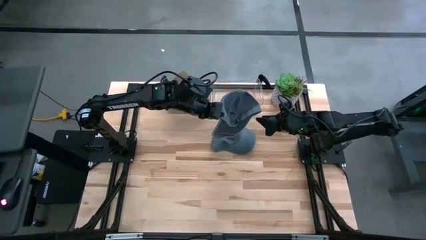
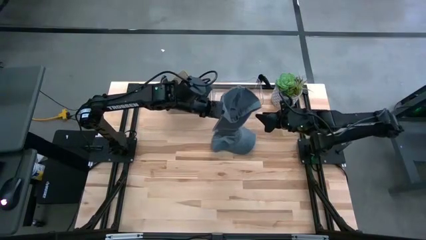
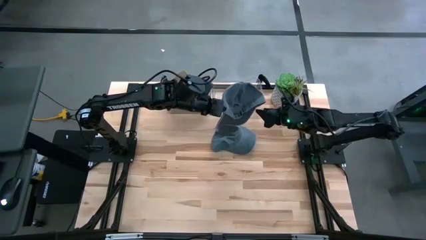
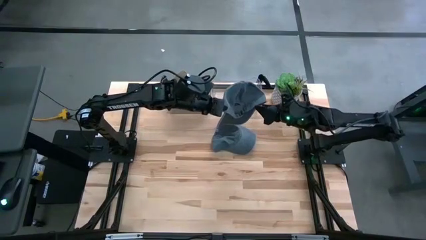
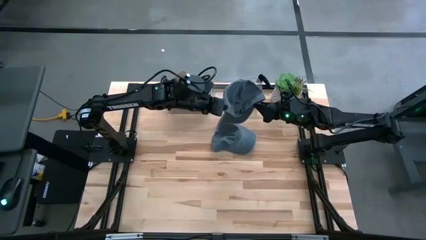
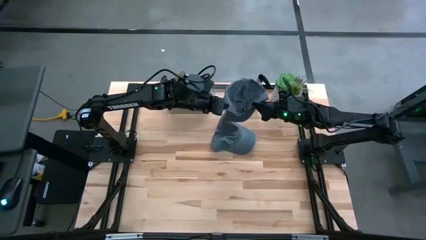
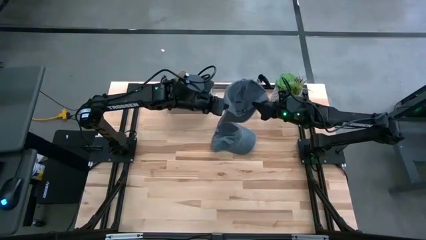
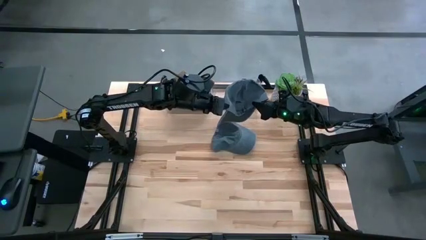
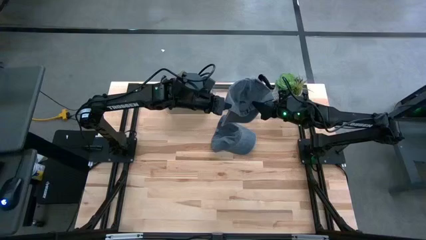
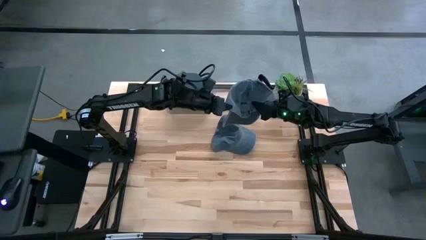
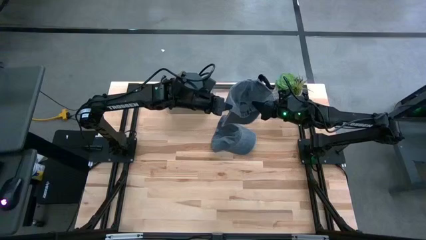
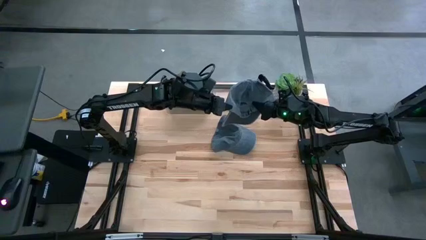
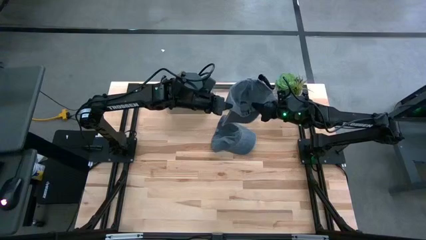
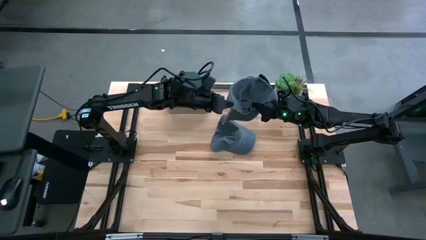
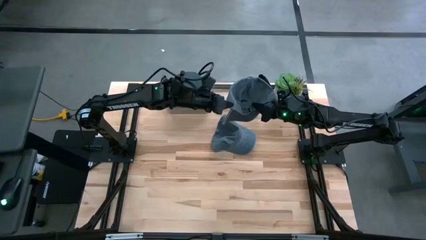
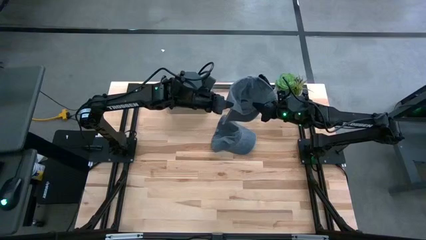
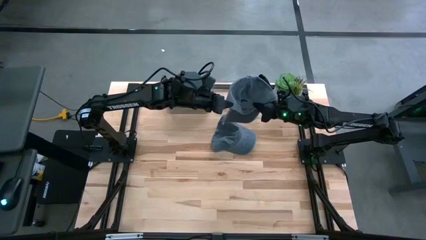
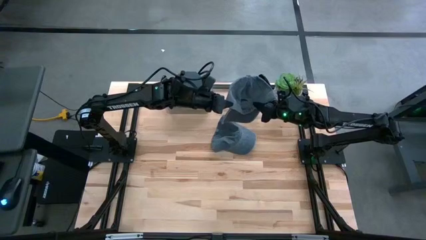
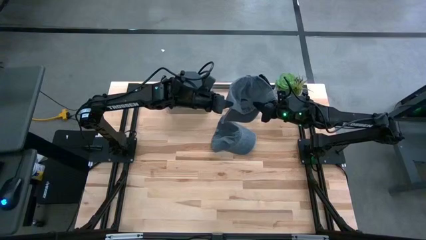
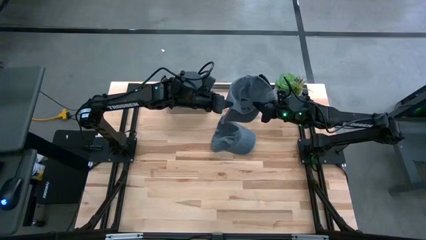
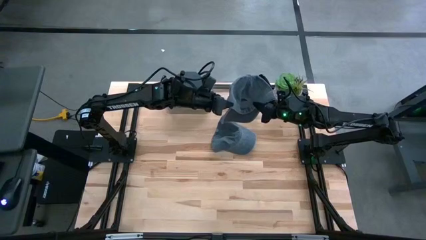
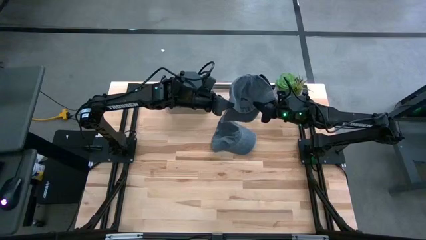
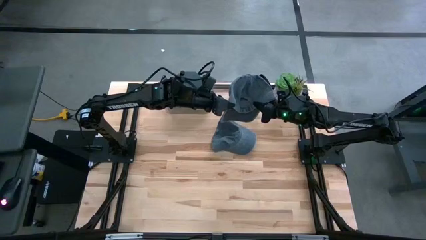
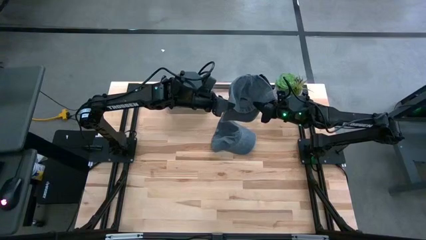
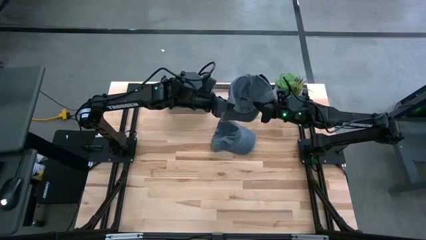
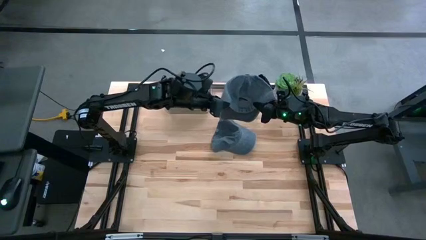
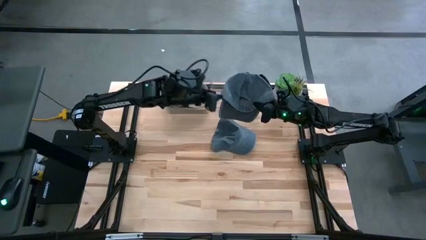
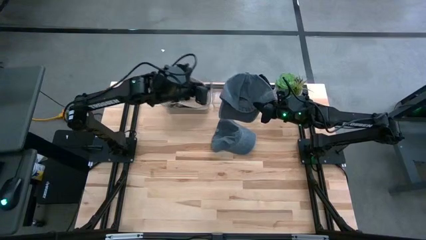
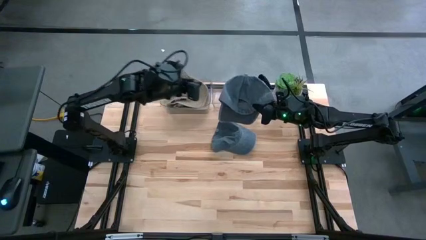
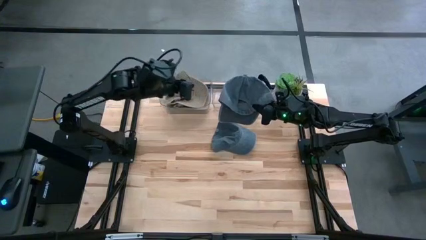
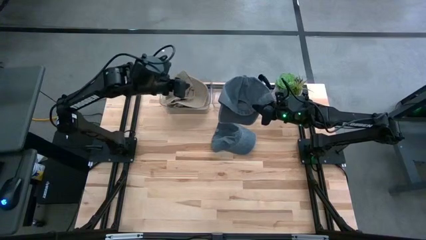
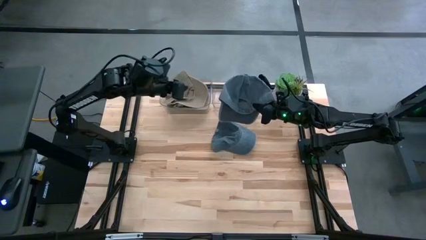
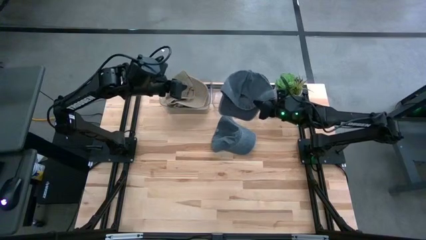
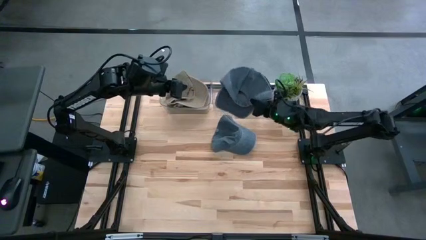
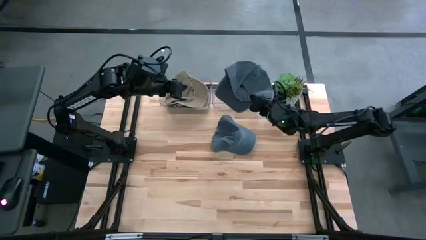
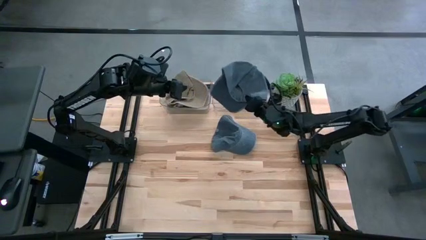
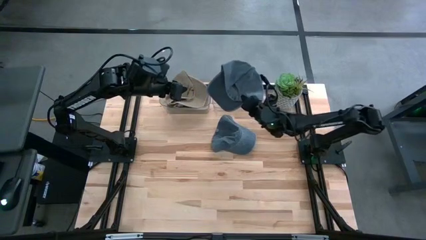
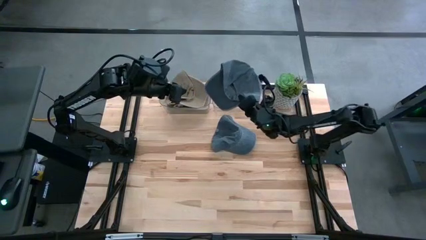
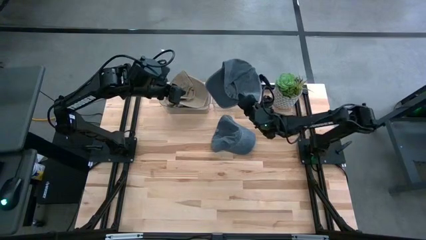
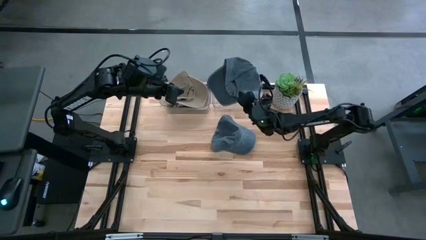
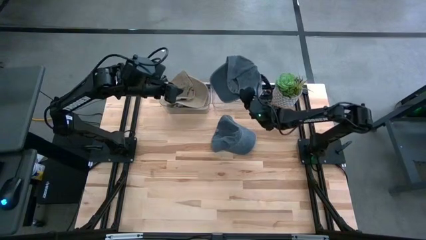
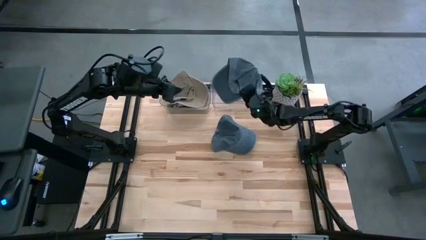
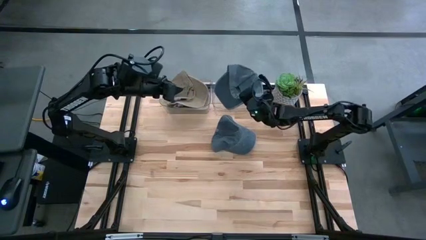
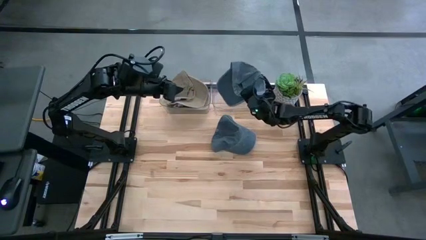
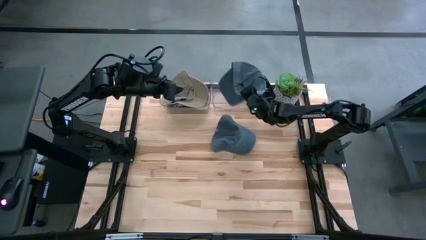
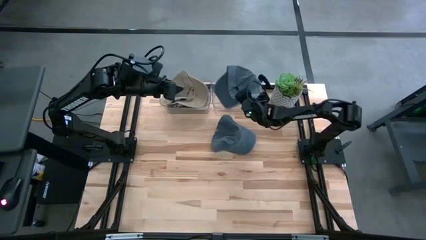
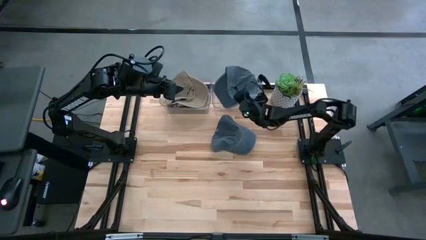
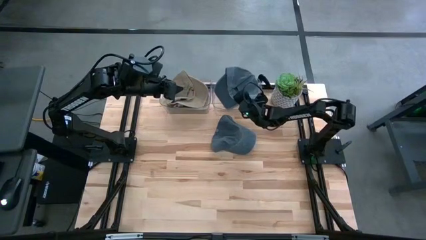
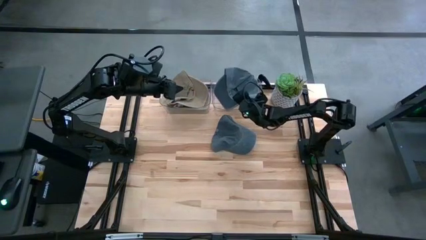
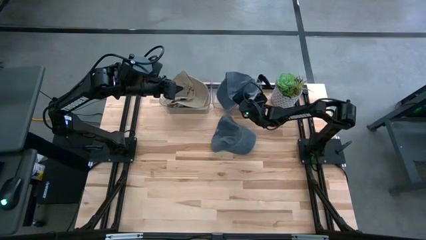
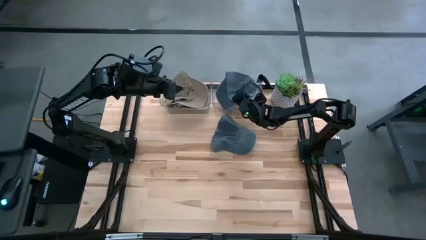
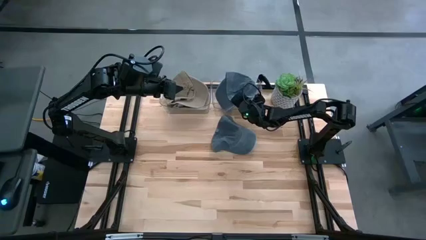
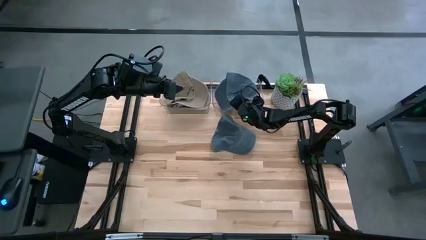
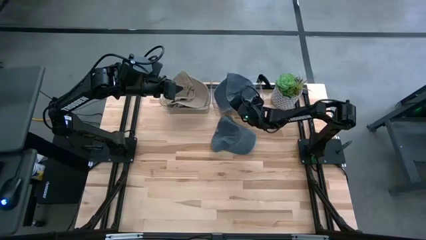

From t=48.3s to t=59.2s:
Task: Pick & Place hat
Put the bottom blue cap into the right transparent bin

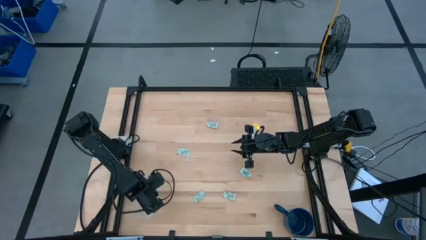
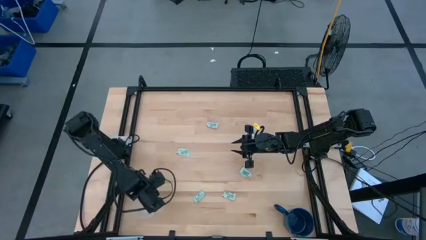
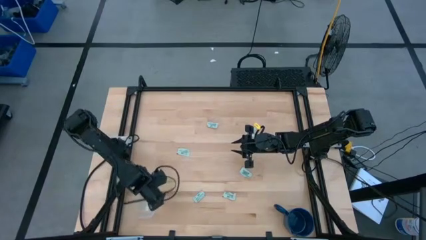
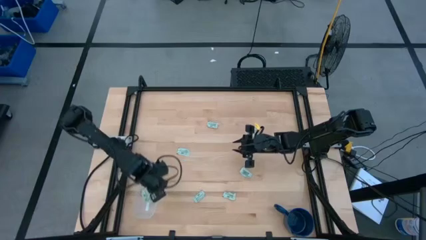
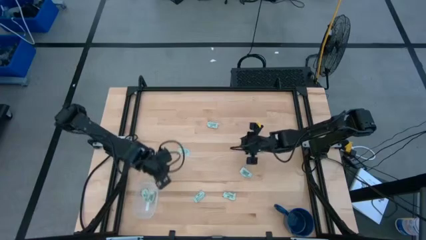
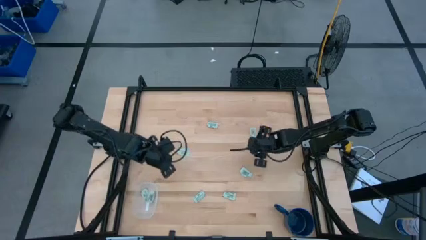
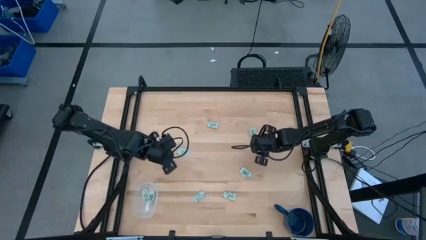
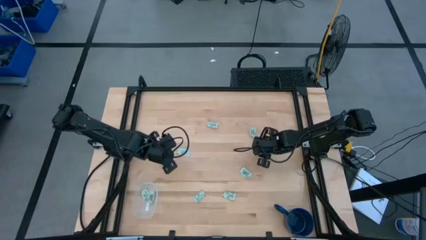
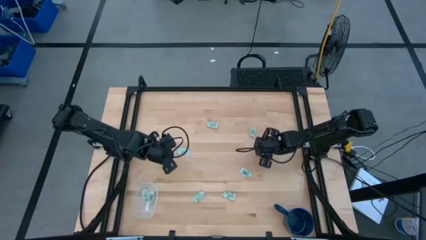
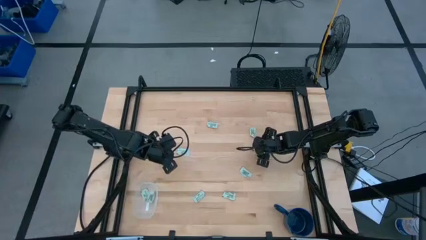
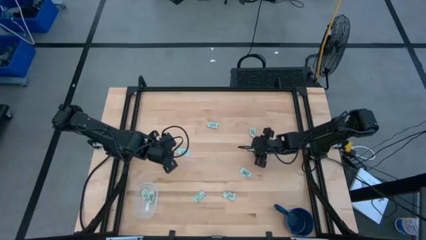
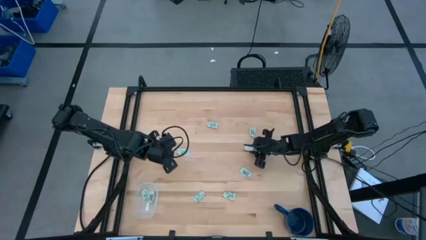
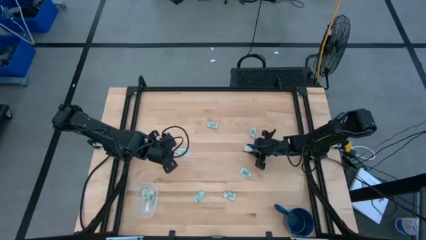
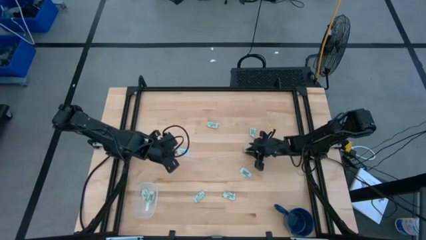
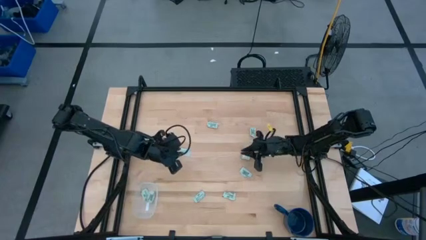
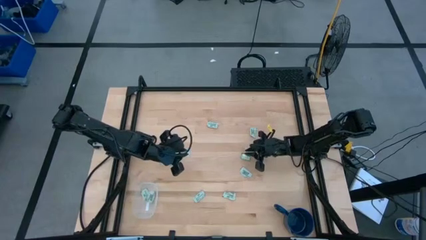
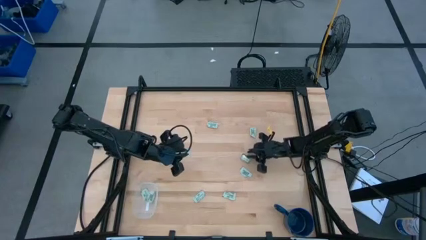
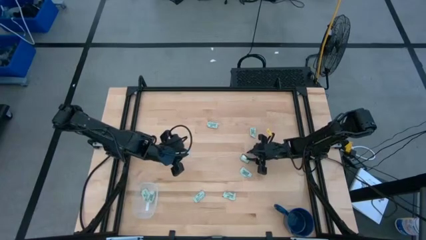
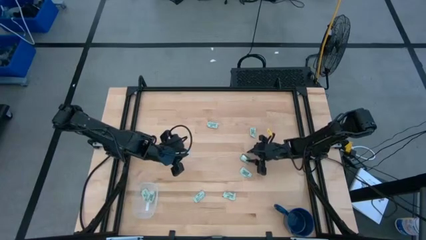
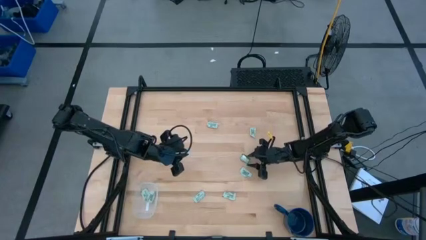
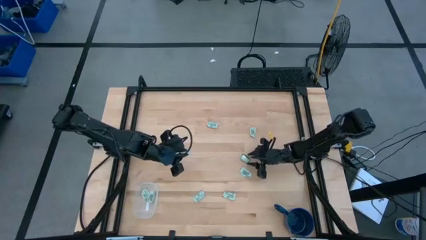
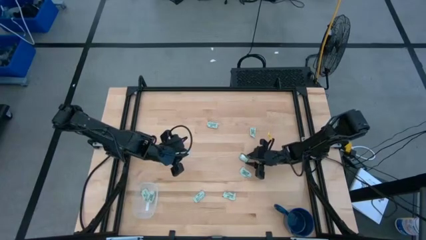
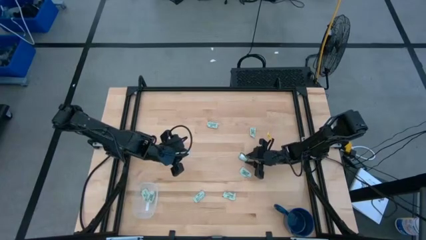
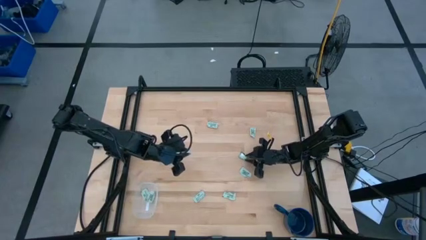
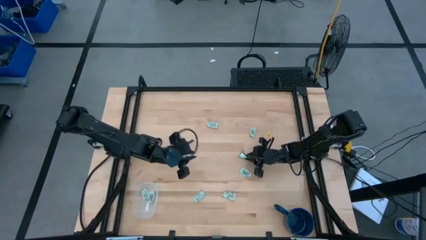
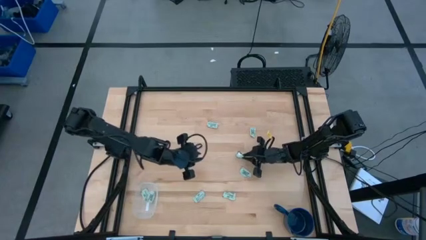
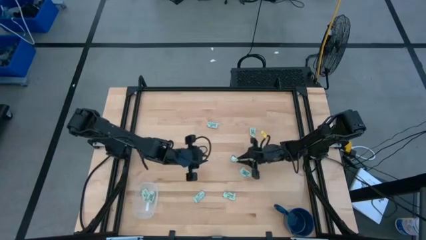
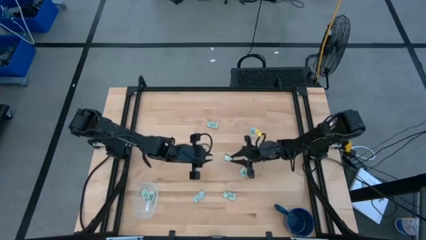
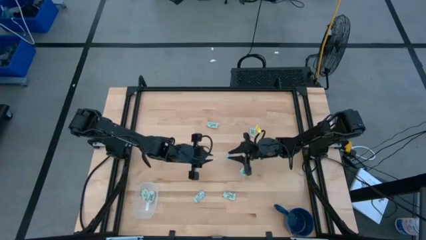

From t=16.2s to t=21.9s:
Task: Pick and place Stevia / Truvia into bins
Put the stevia packet into the transparent bin
